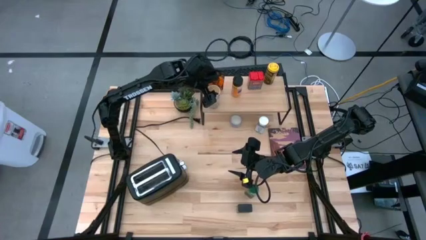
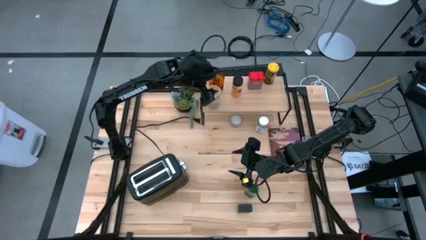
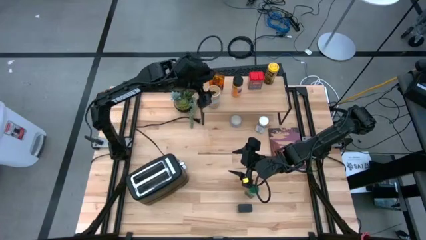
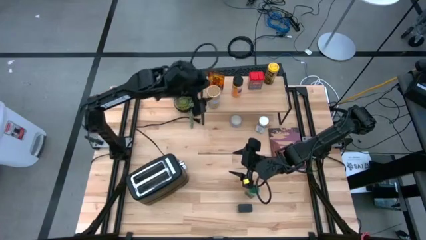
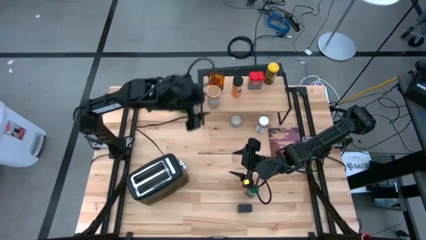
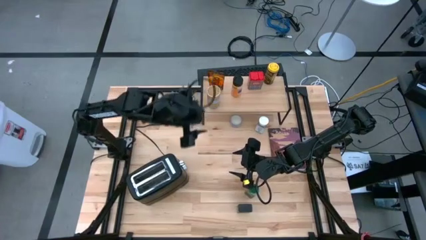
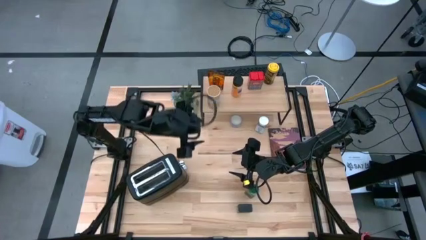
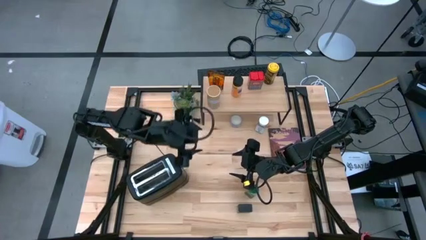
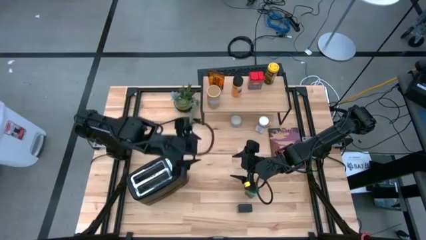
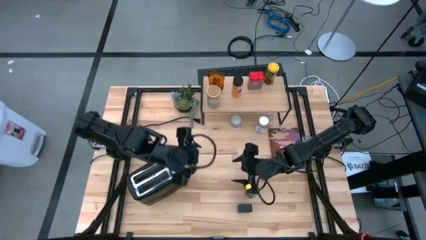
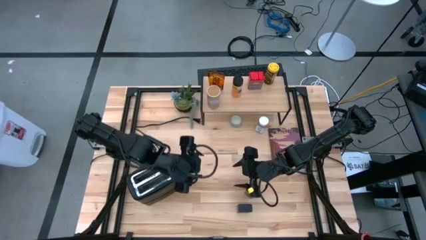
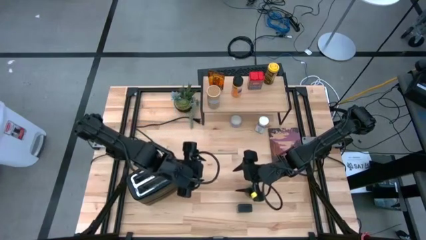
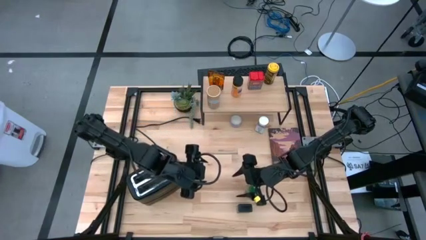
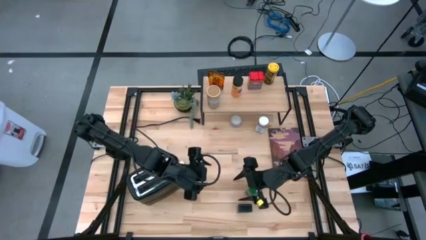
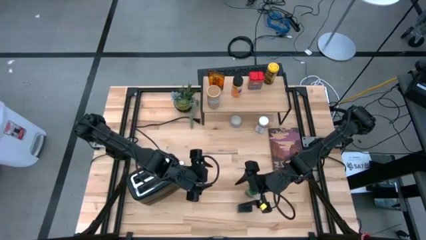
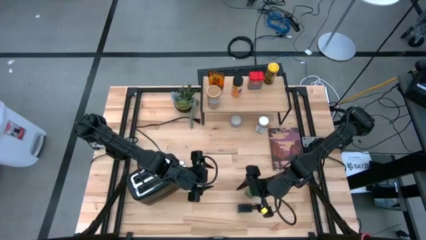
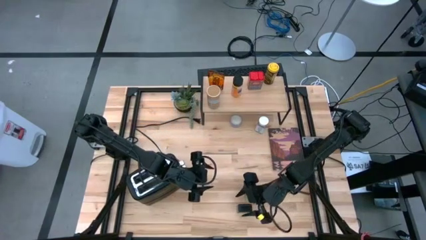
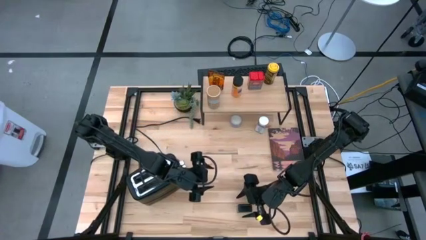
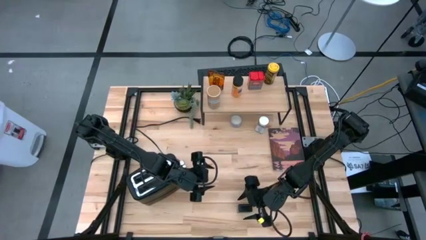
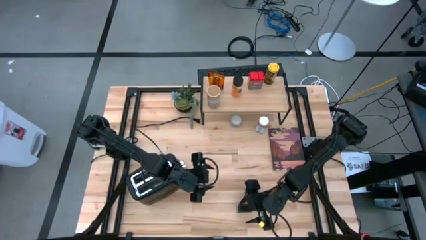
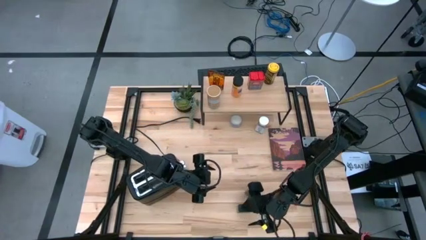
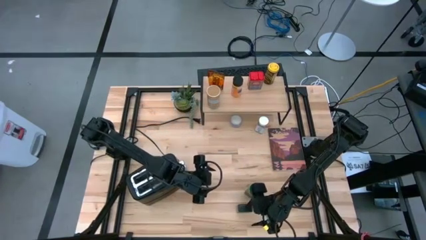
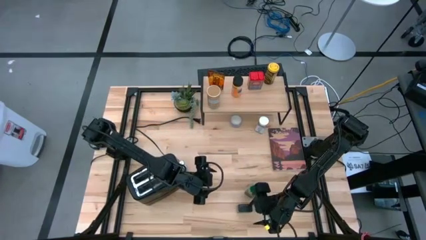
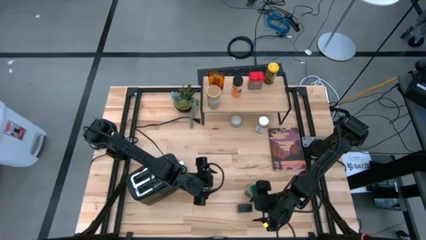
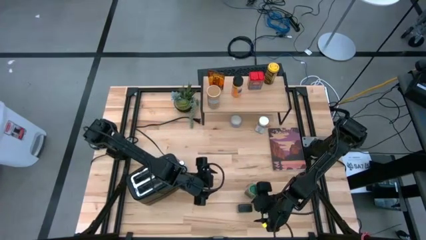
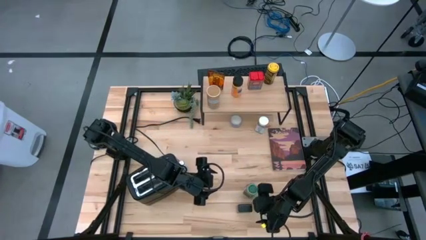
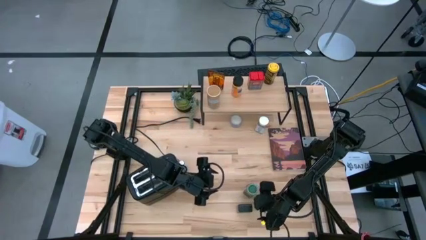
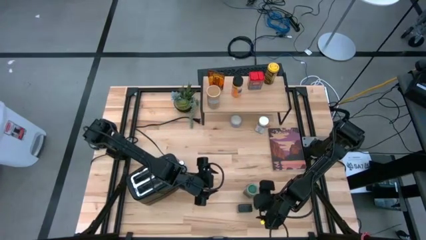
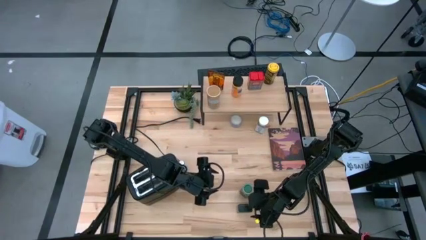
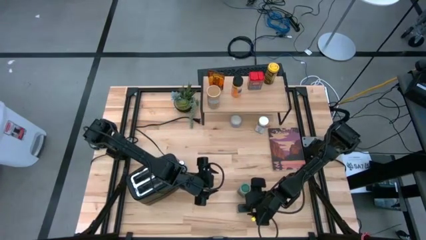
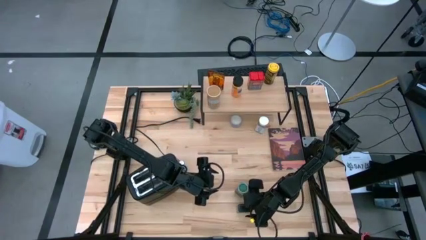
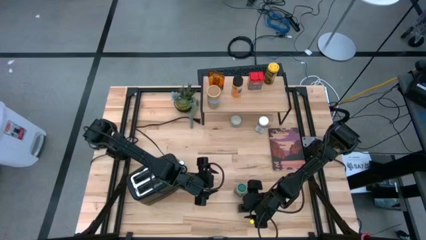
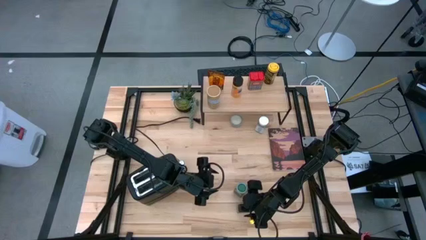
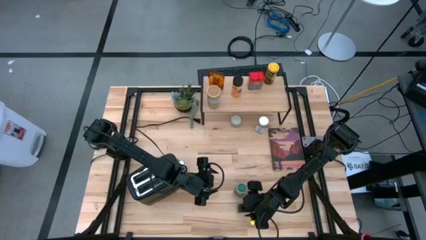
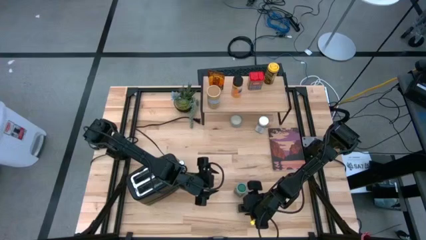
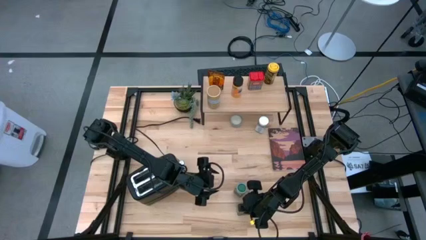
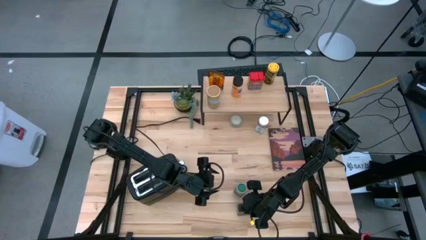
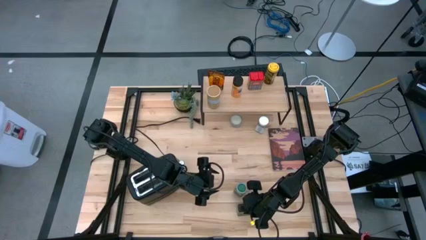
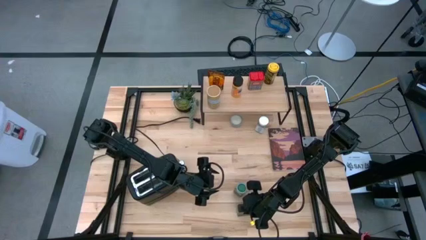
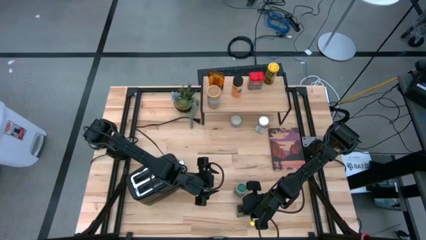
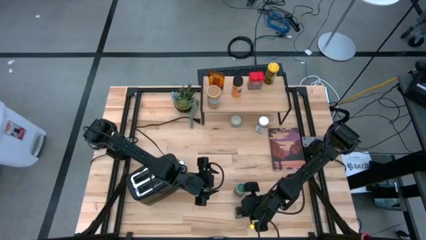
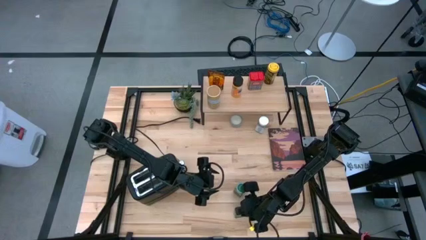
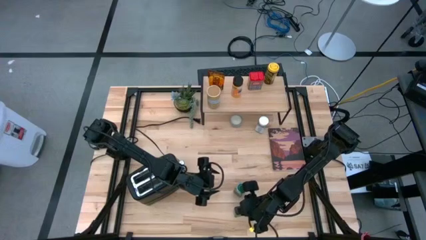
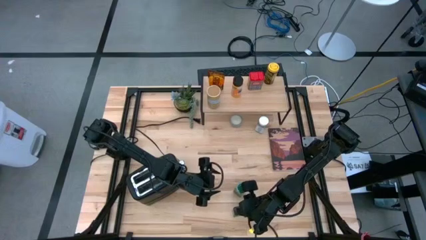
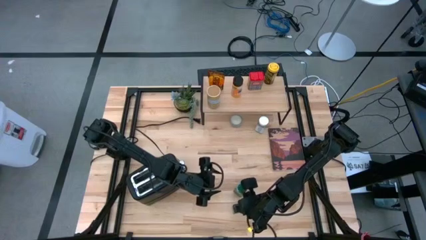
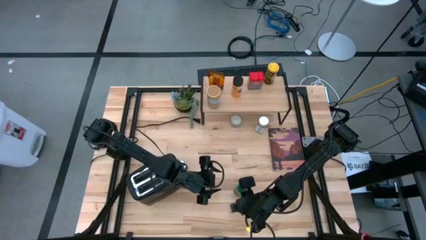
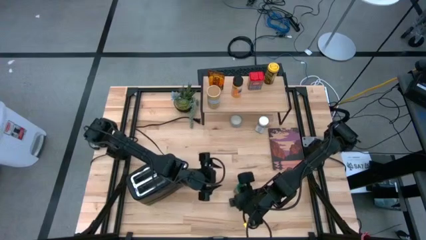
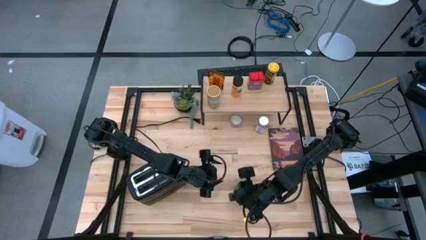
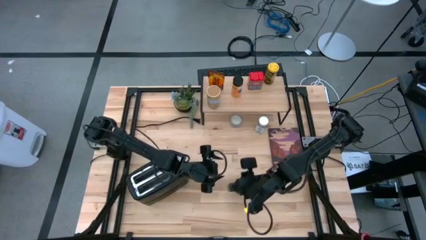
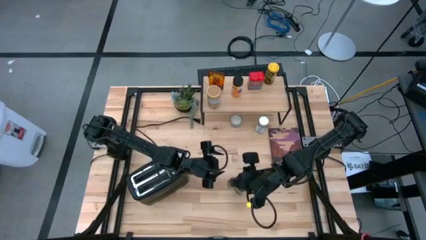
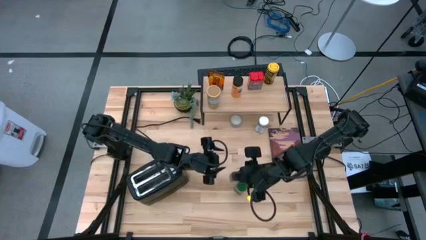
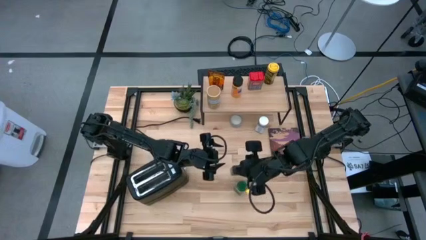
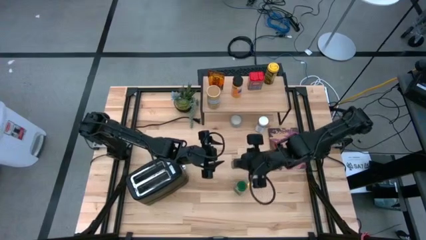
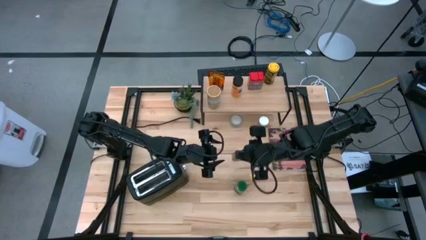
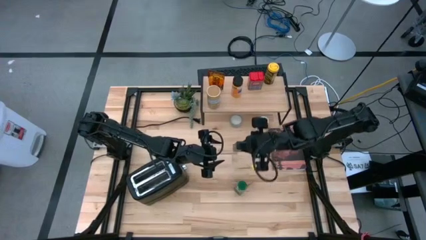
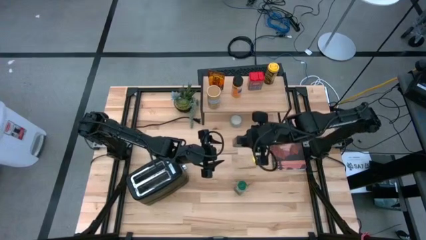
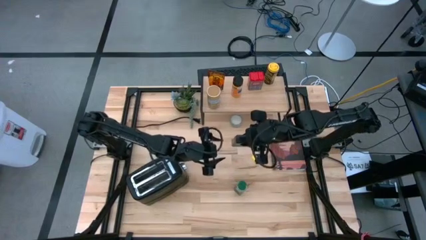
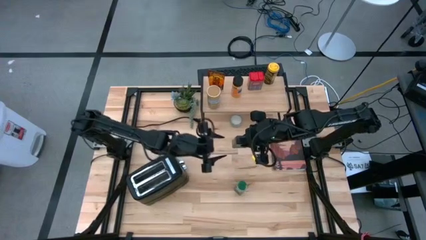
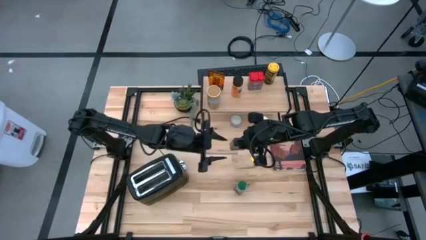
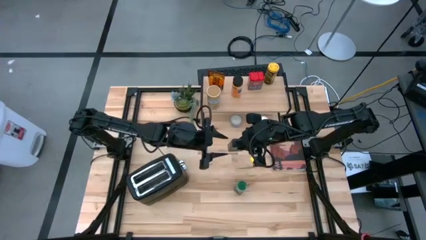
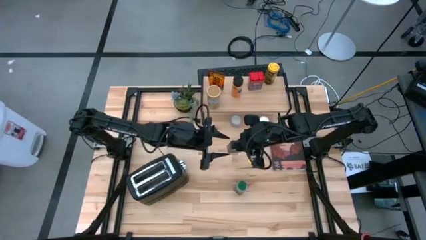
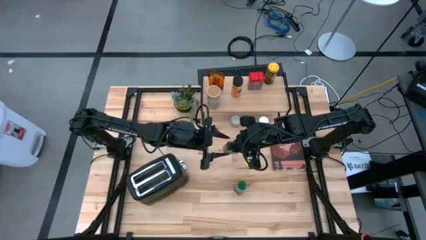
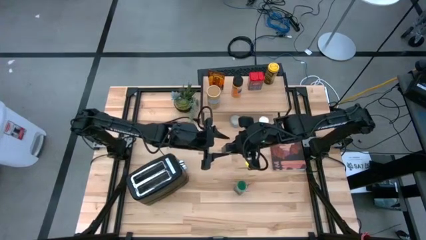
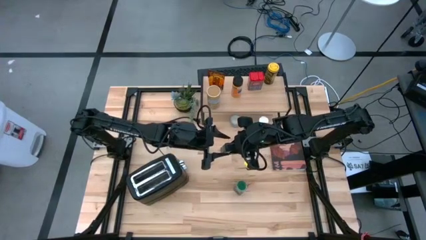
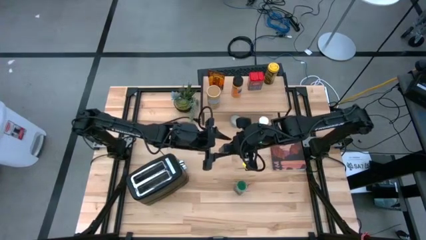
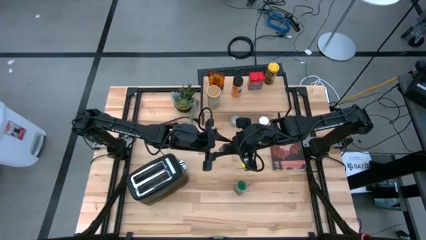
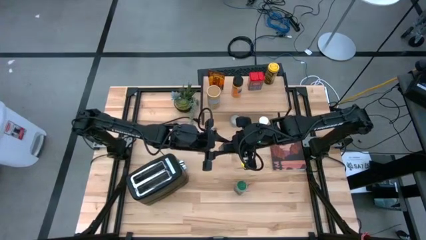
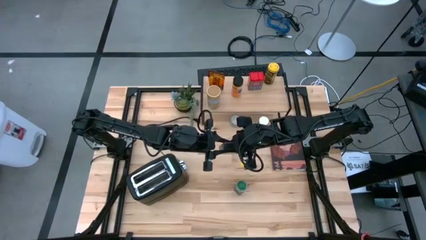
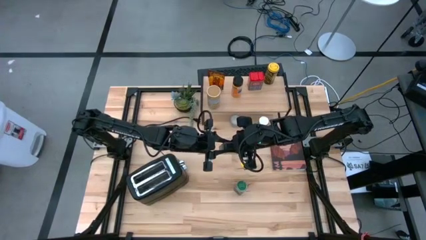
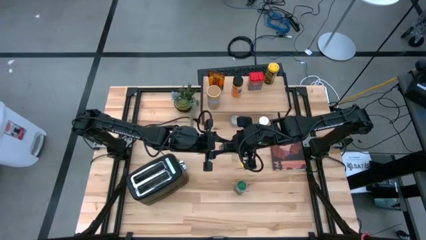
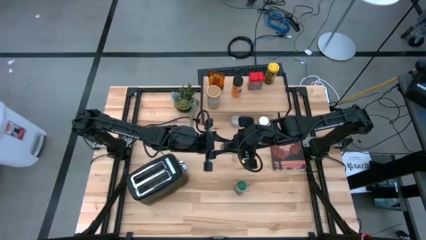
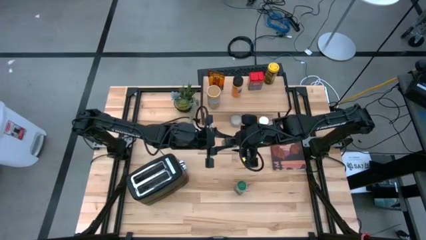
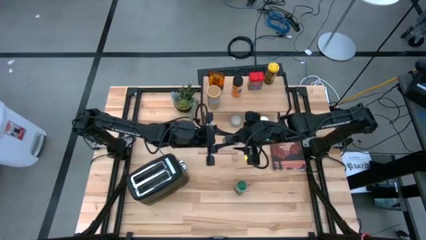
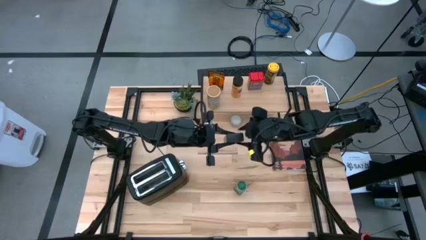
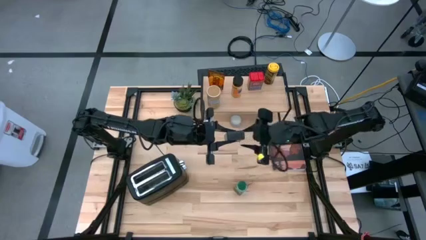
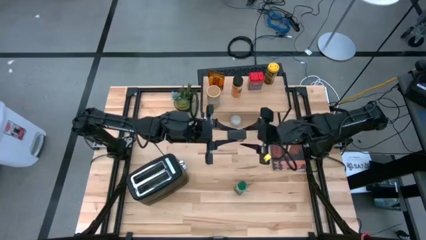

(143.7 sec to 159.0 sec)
Task: Shelf spices
Put the black seasoning can on the shelf

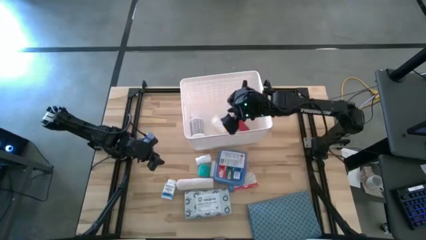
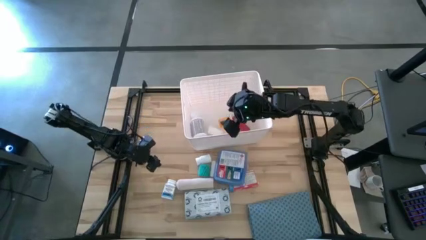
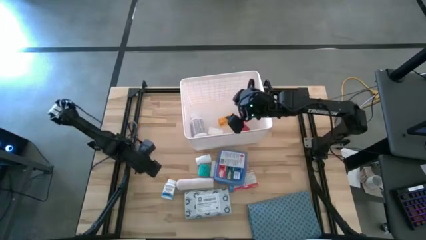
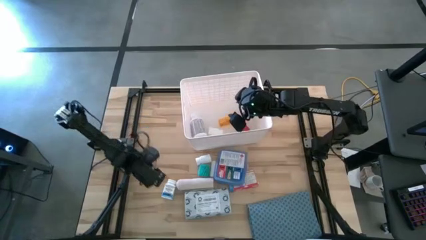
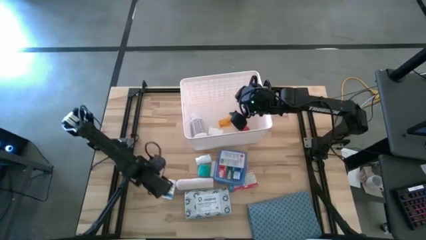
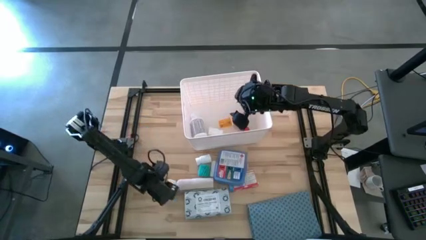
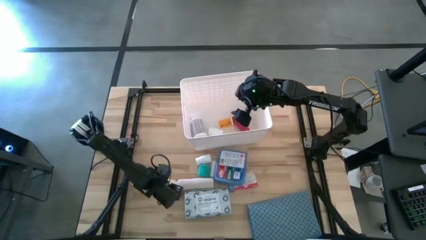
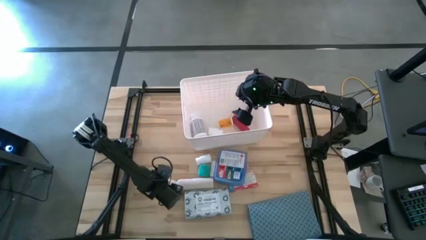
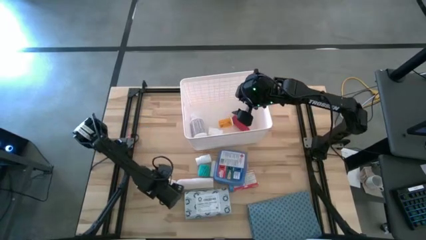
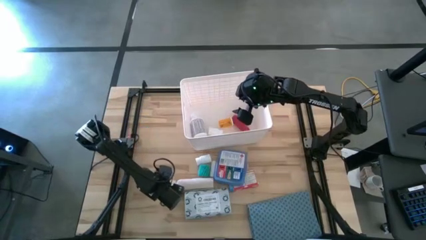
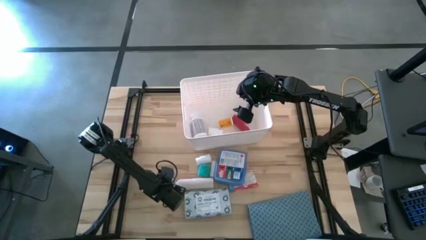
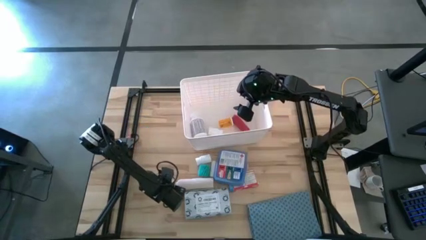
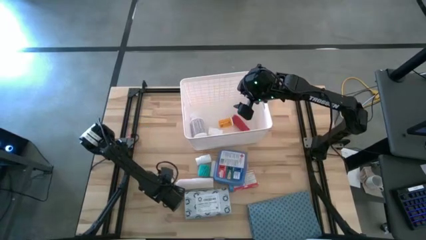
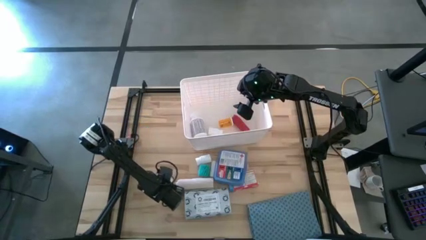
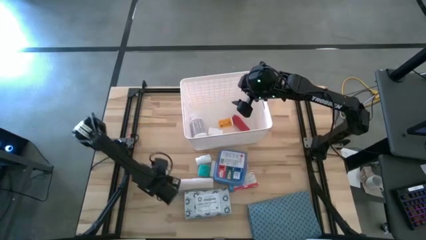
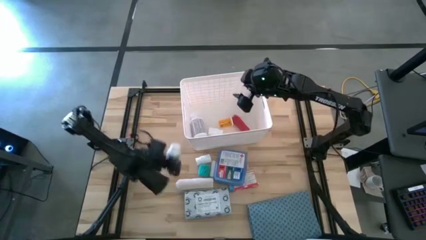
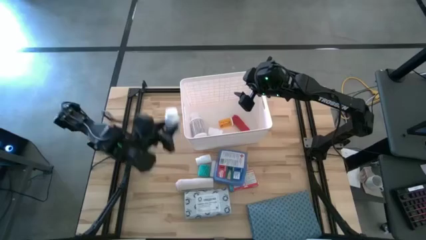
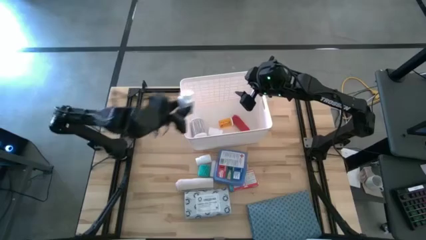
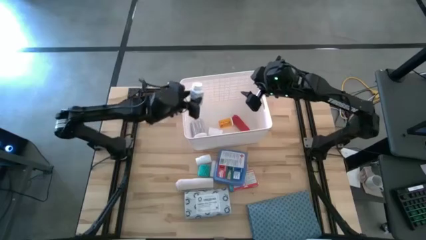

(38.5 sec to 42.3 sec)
Task: Pick & place medical supplies in basket/bin
Put the blue and white pill bottle into the white bin
